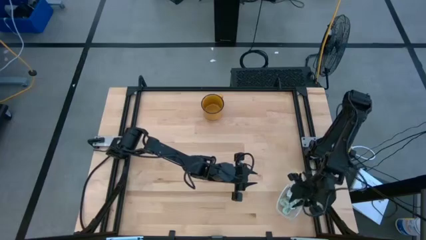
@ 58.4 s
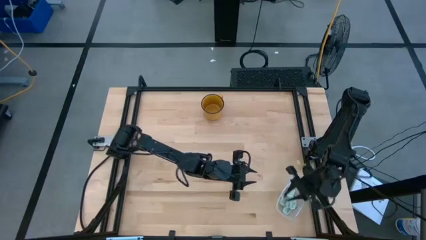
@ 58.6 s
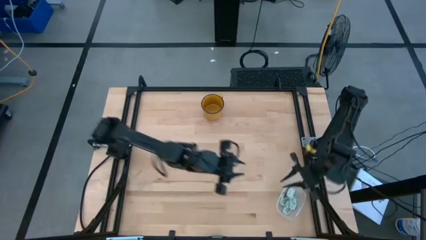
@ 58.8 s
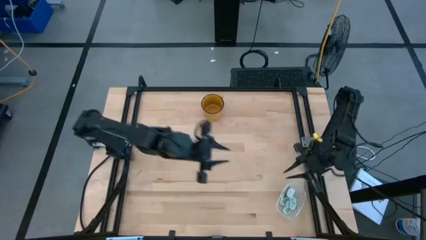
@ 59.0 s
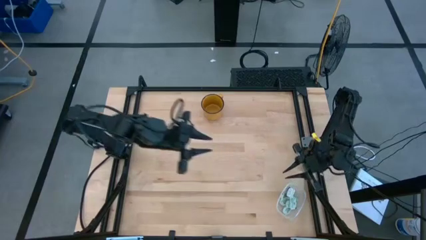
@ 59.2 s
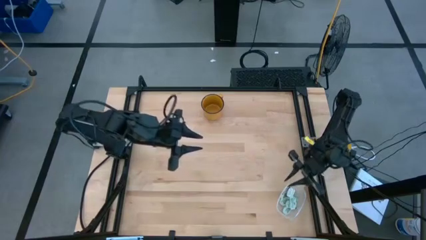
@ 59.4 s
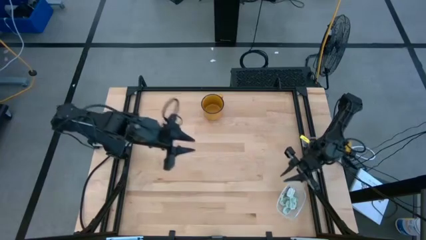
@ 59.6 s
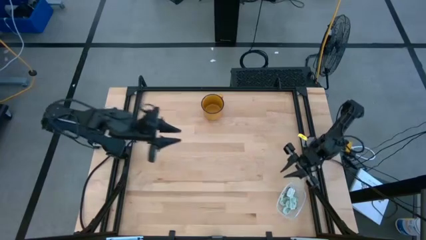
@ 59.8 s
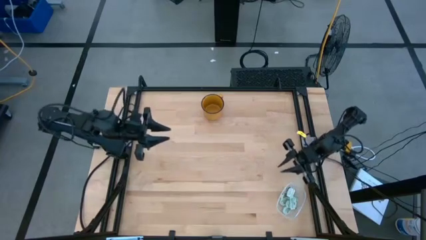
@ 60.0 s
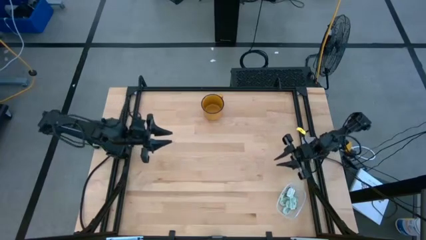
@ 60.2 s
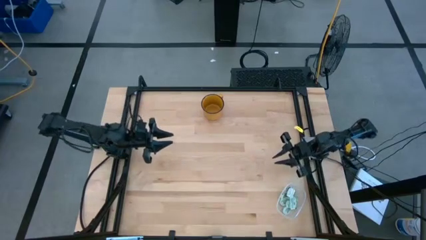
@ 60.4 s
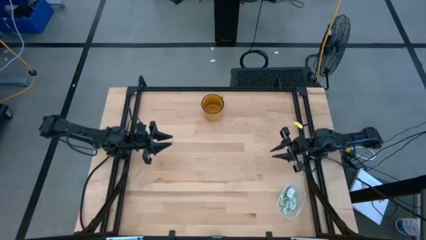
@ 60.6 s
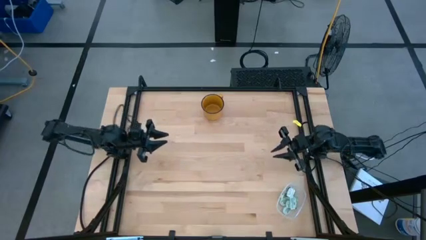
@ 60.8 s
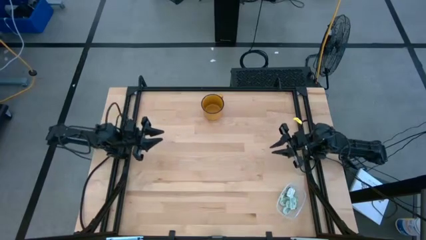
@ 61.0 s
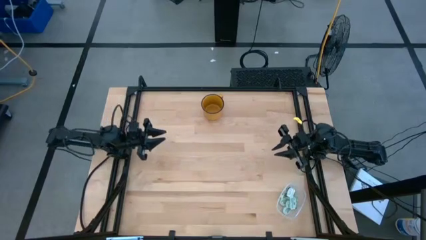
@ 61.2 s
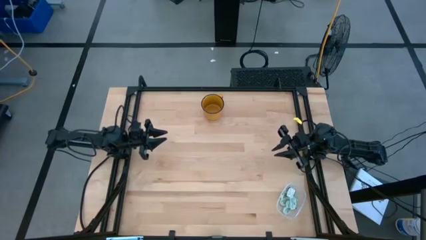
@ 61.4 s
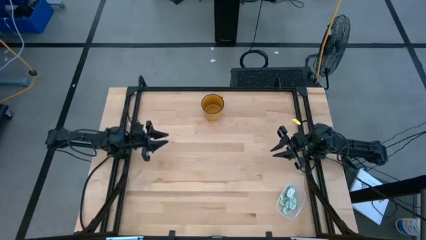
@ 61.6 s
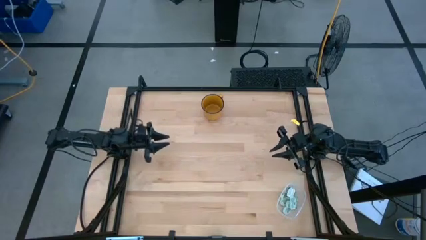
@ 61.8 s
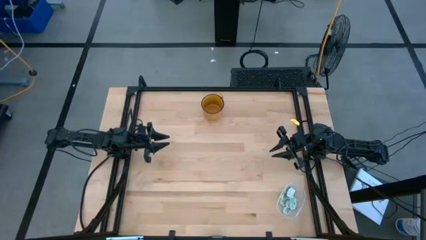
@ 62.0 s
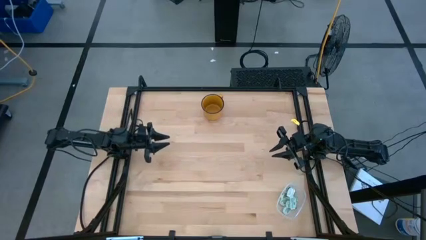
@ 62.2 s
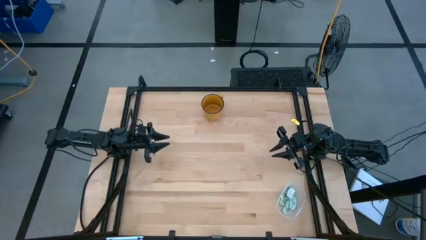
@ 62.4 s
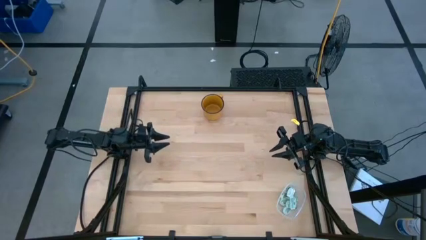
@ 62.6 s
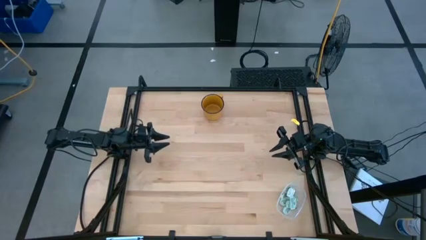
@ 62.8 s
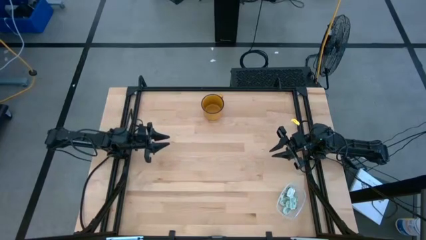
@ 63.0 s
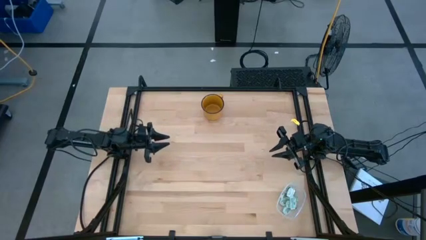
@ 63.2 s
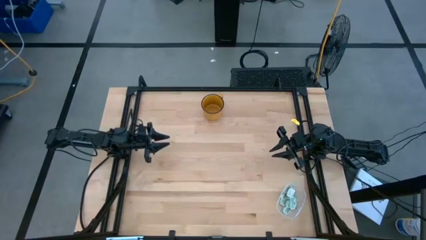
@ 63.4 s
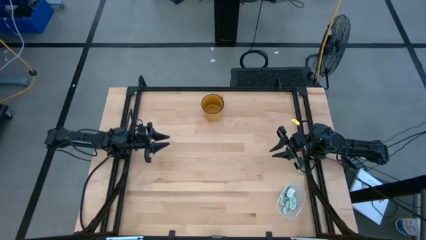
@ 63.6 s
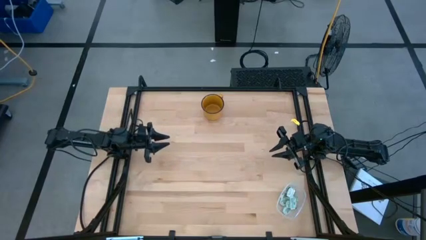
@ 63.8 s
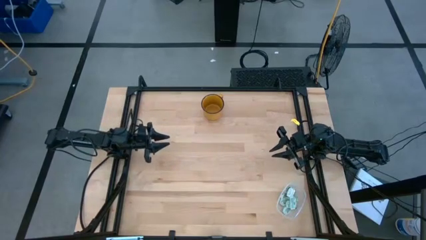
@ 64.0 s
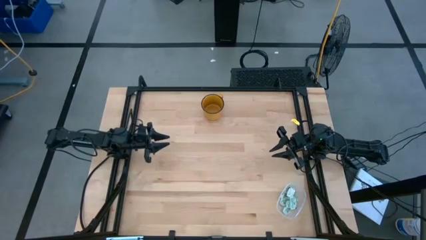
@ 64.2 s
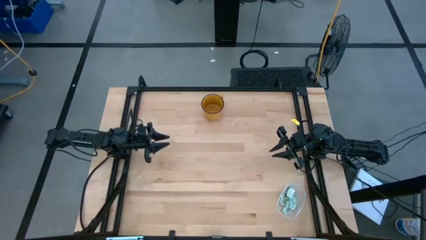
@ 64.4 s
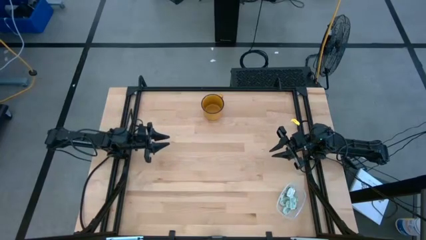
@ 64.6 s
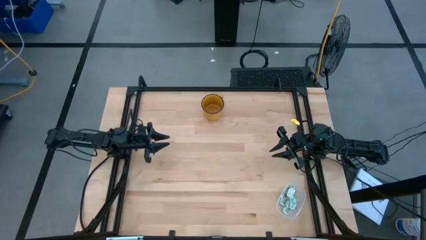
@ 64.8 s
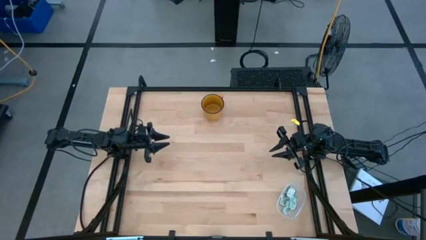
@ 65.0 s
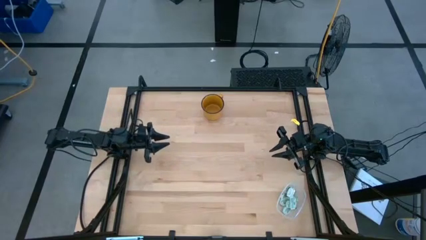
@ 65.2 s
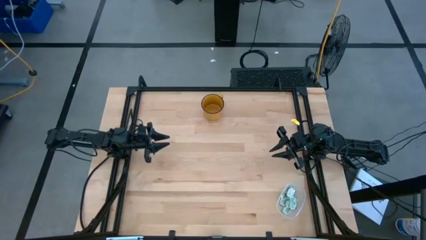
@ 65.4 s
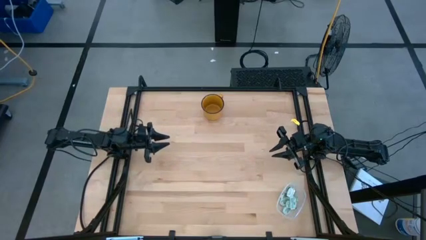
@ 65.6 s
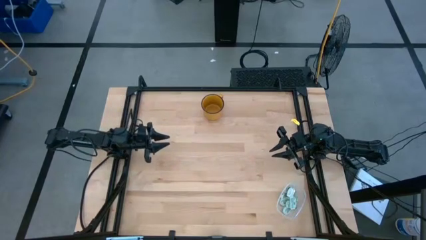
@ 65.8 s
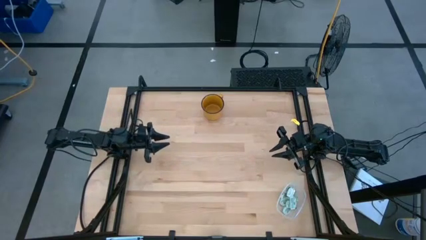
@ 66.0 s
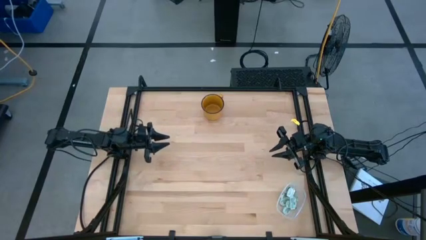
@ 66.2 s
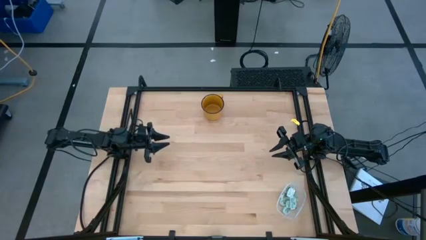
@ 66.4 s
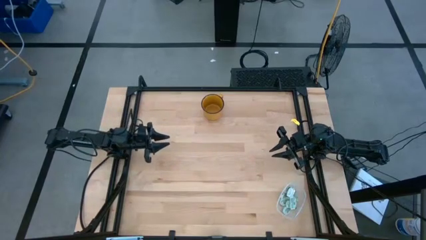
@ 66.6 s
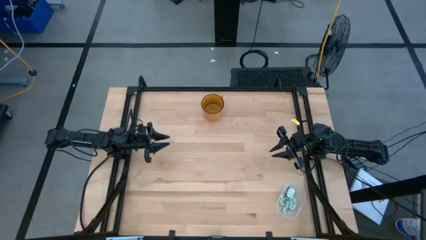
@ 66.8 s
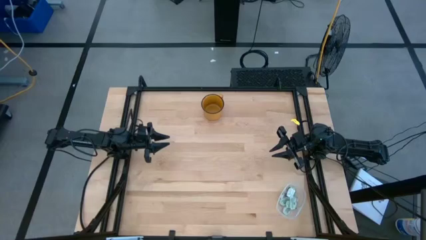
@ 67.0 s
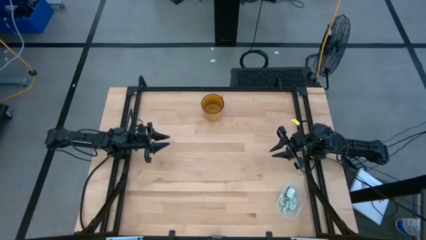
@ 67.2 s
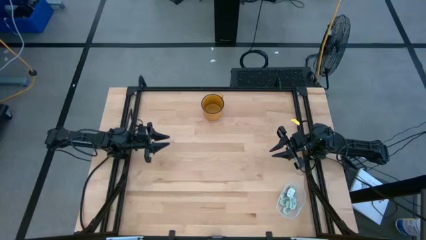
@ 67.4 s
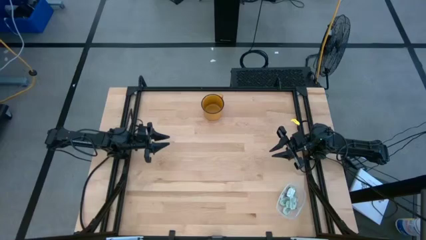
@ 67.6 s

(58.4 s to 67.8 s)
Task: Pick and place Stevia / Truvia into bins
Return to Home Position

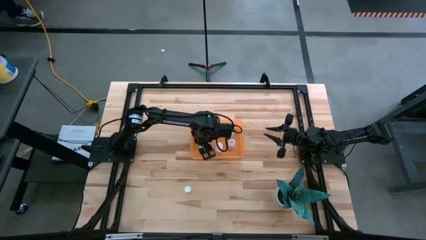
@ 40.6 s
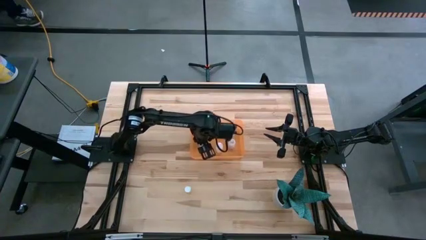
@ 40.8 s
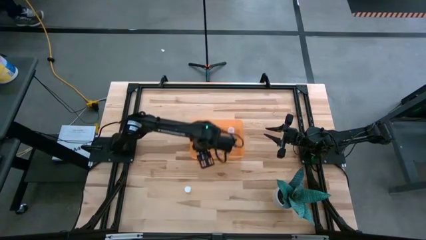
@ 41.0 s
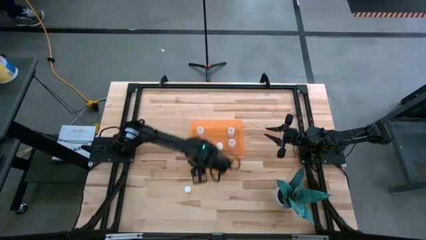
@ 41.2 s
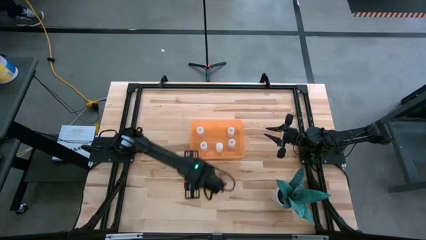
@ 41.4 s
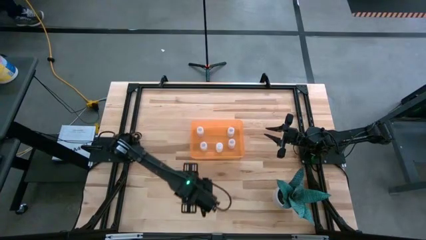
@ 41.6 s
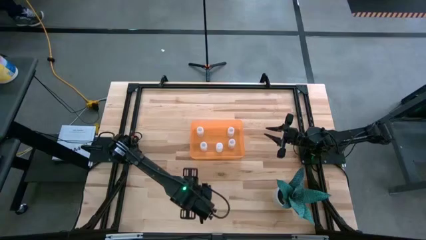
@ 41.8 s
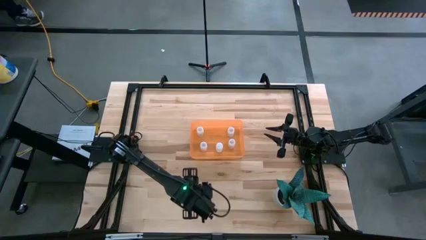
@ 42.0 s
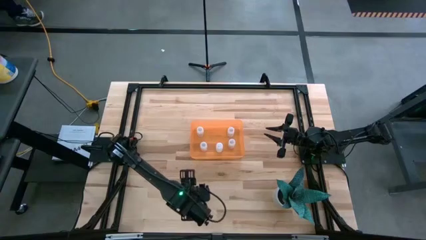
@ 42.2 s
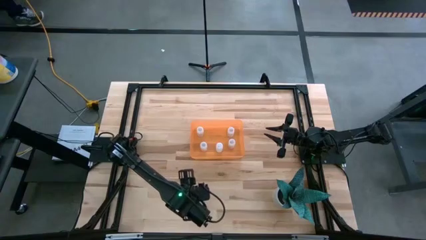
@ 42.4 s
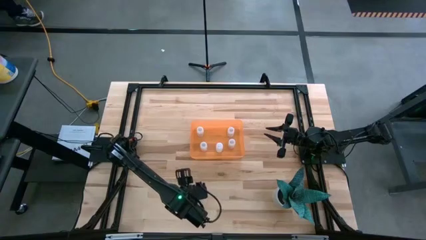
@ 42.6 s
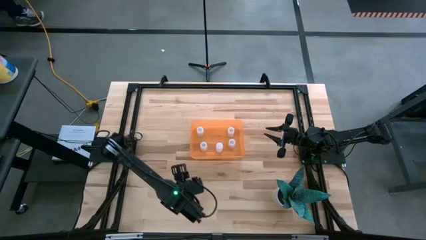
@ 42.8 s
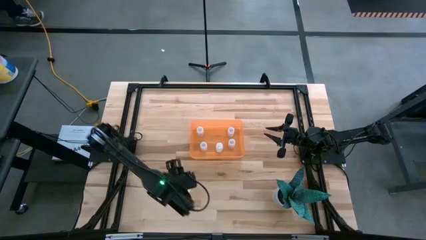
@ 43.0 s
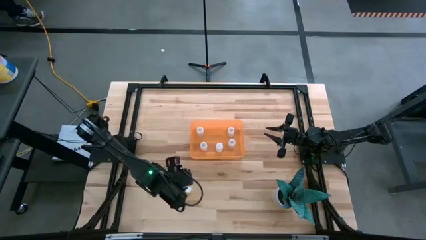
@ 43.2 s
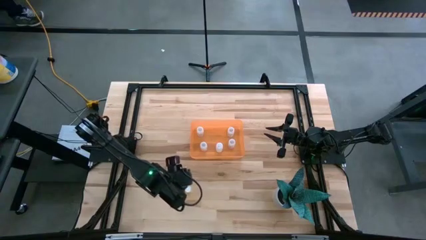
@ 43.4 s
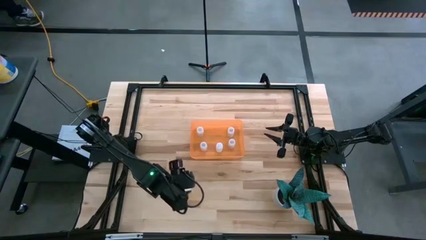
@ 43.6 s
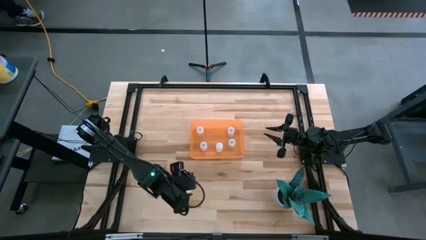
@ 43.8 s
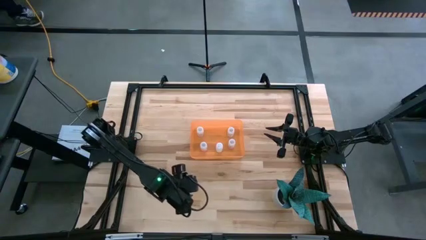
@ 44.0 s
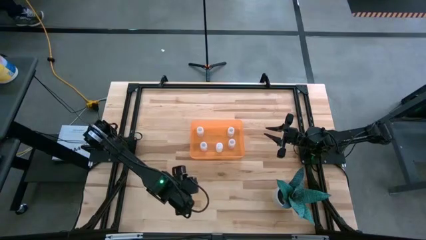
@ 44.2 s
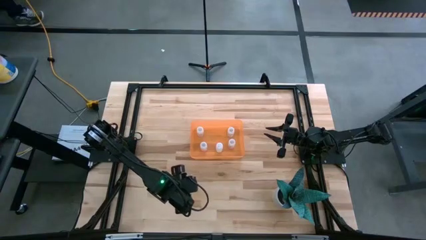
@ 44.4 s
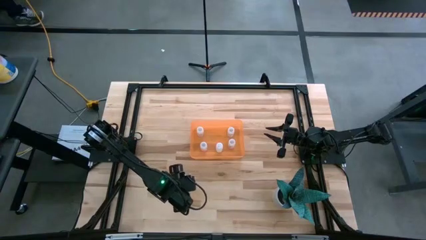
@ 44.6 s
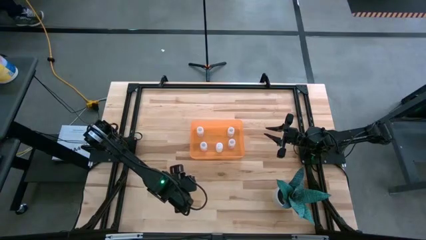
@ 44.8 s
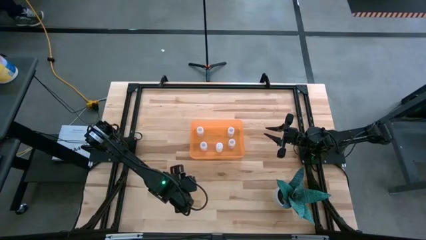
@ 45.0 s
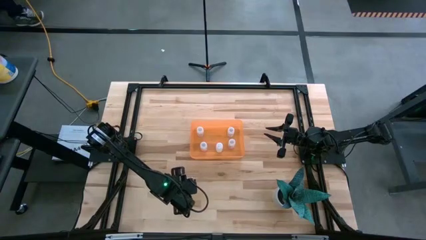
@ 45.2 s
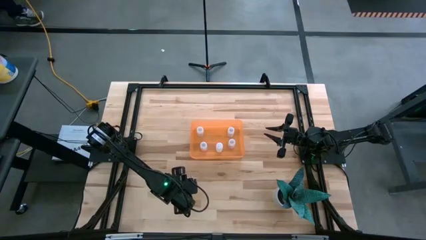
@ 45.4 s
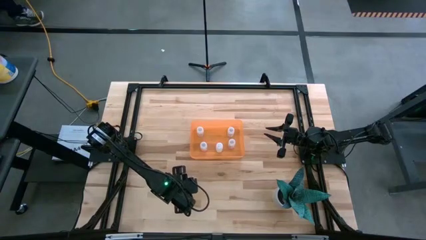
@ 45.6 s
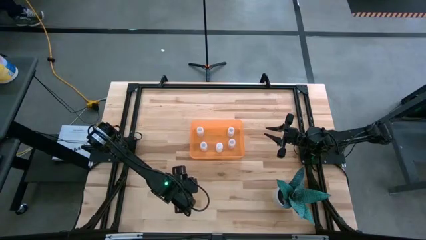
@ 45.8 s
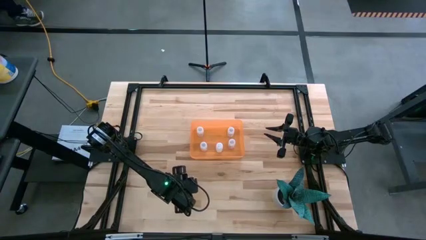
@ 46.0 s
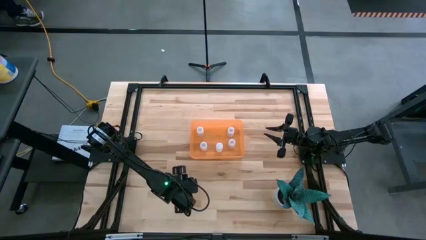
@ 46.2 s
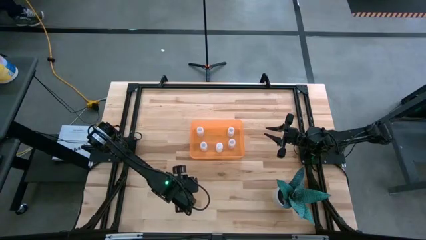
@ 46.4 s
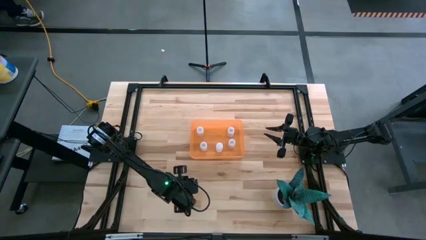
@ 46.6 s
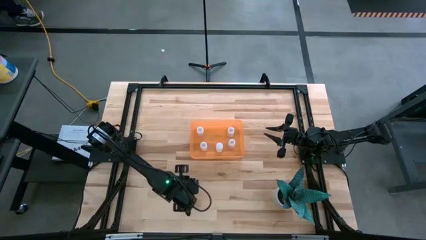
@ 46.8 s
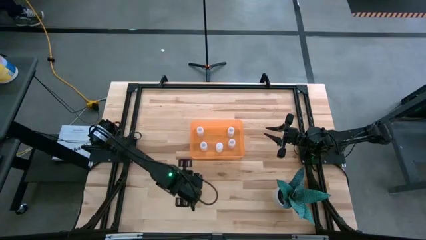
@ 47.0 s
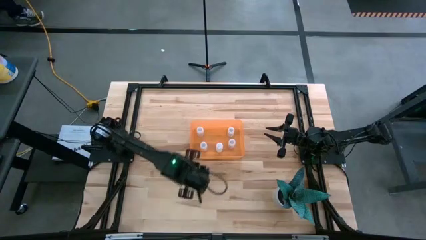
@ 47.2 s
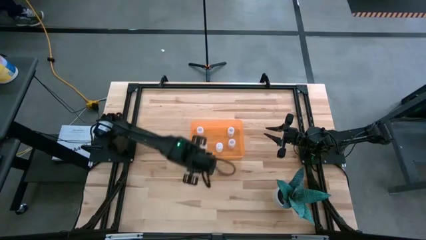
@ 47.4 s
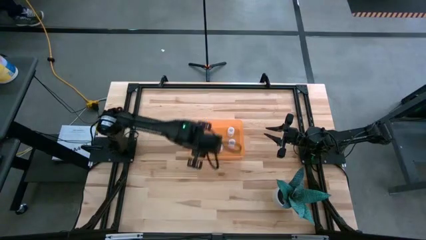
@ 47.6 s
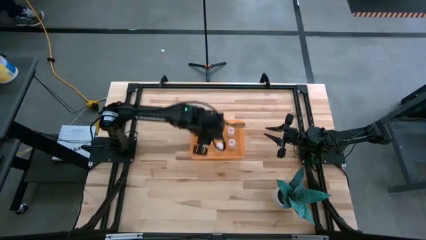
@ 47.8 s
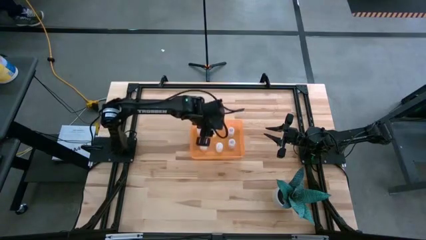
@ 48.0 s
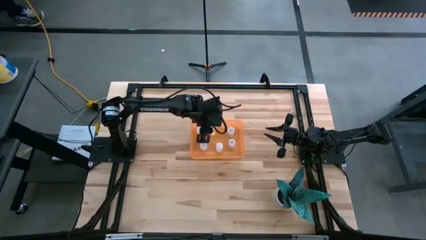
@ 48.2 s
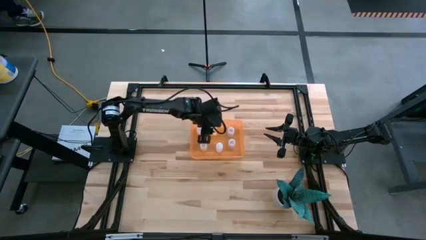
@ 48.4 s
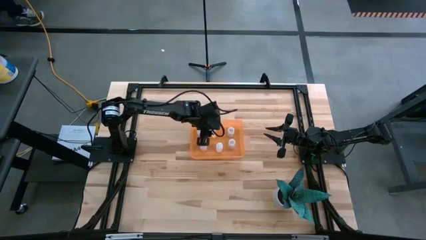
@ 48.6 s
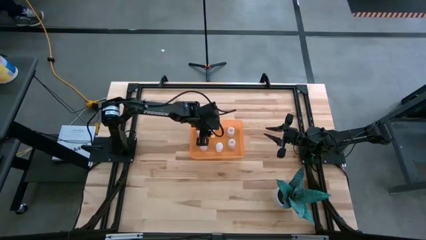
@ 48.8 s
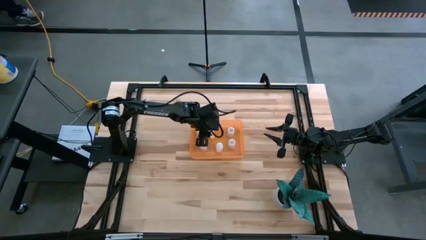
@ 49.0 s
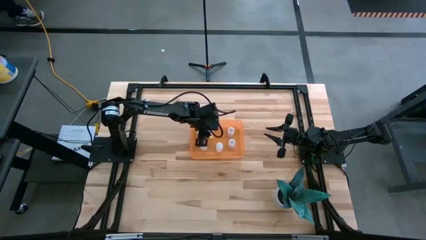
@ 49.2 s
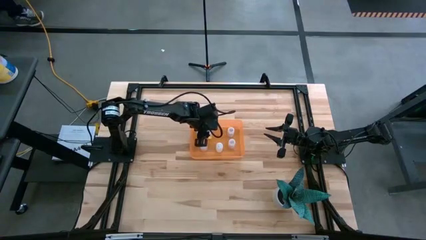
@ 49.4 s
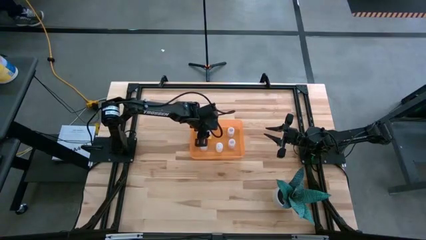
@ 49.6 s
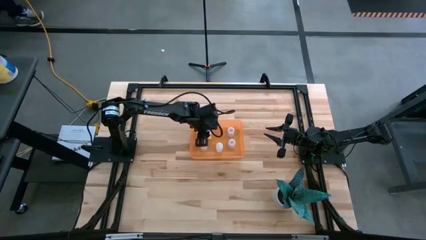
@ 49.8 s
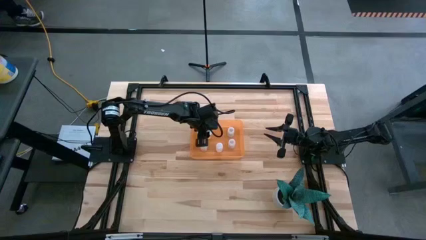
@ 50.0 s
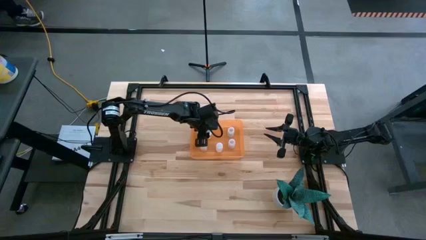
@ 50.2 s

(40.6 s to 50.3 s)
Task: Pick and place pill bottles into a basket
Put the yellow pill bottle in the orange bin
